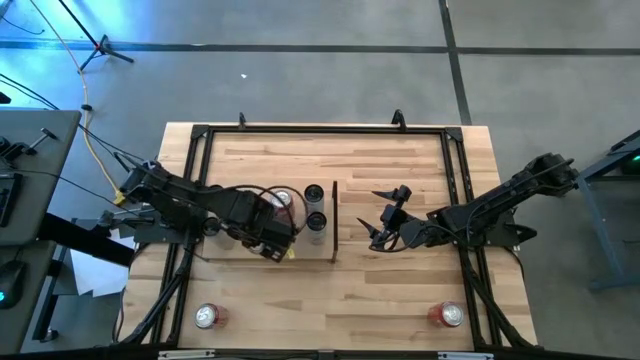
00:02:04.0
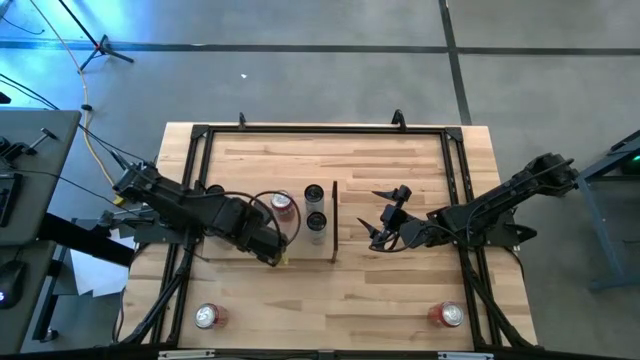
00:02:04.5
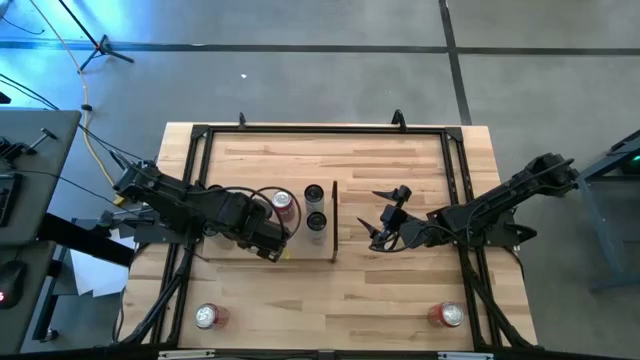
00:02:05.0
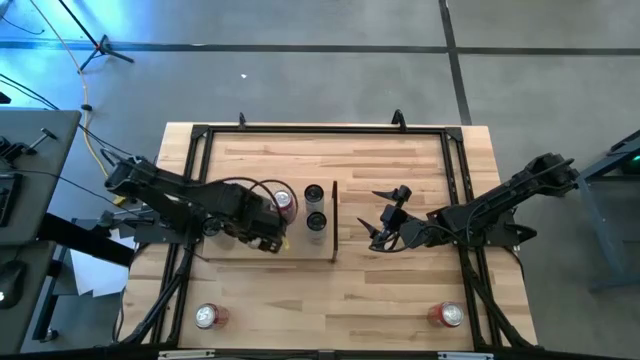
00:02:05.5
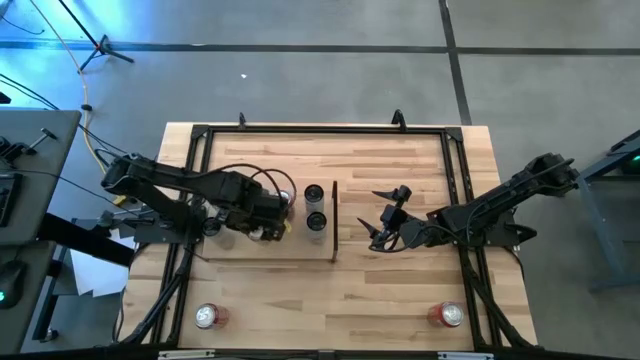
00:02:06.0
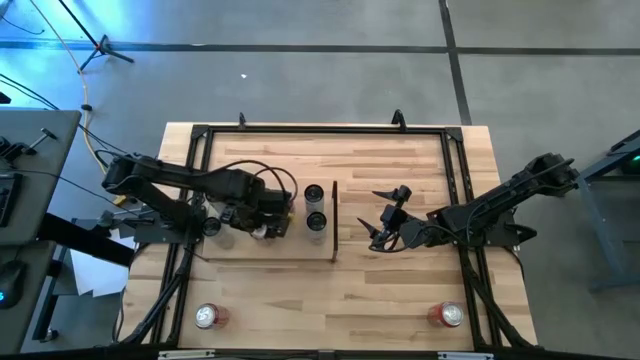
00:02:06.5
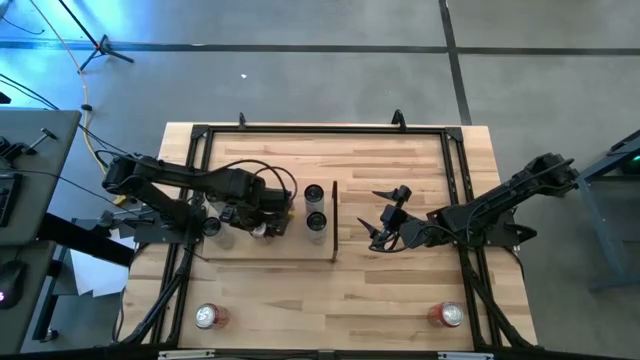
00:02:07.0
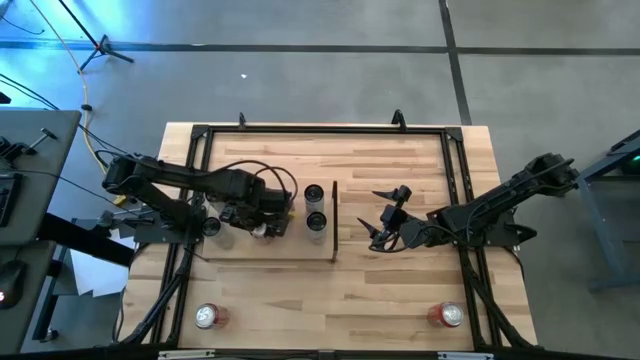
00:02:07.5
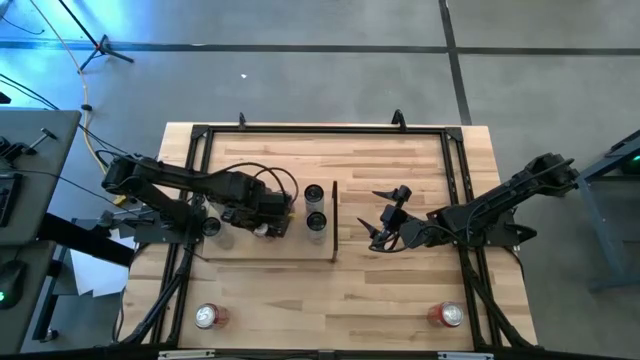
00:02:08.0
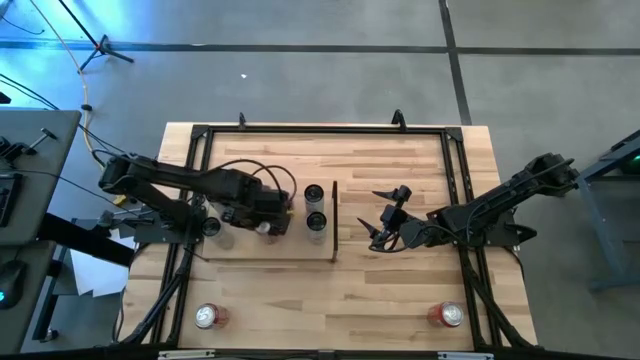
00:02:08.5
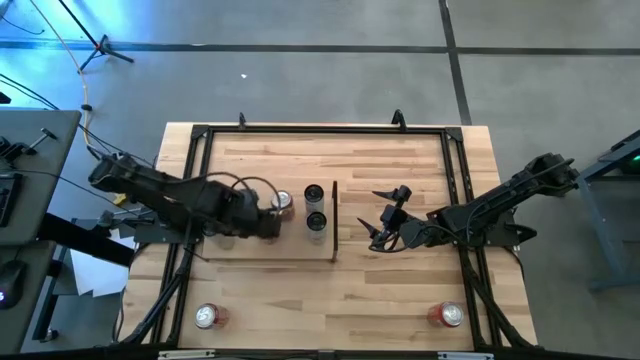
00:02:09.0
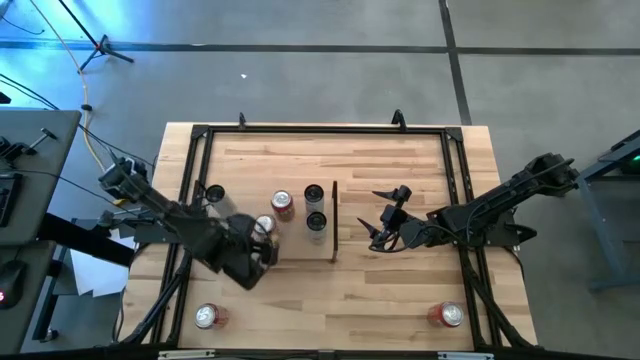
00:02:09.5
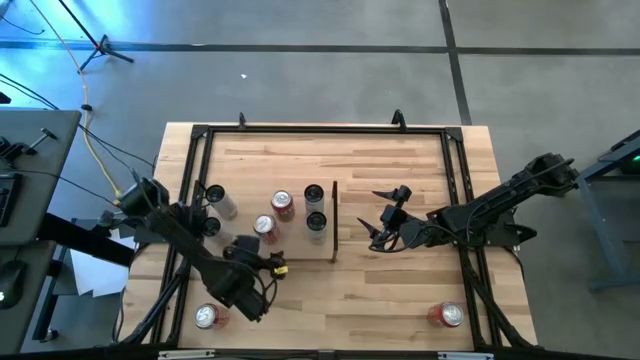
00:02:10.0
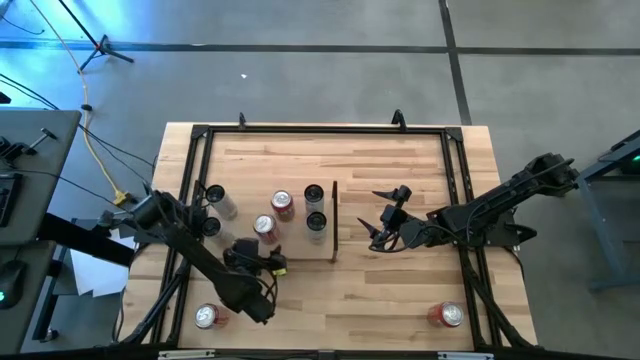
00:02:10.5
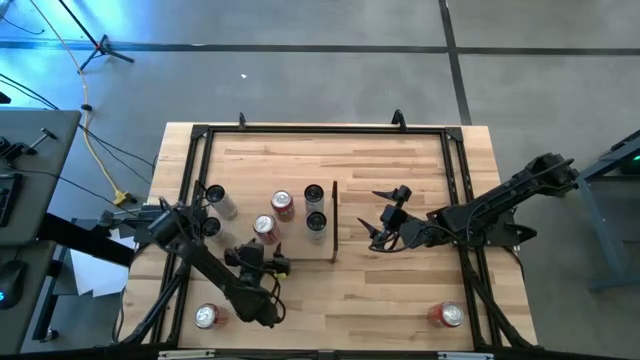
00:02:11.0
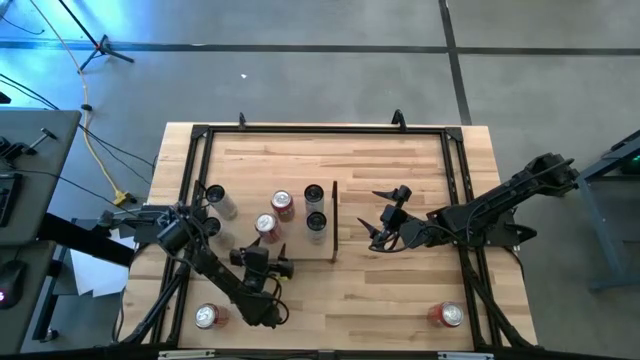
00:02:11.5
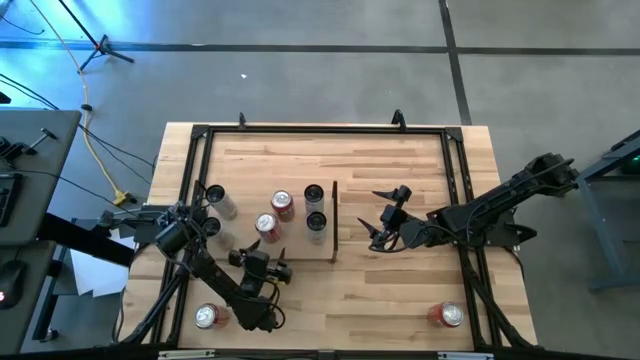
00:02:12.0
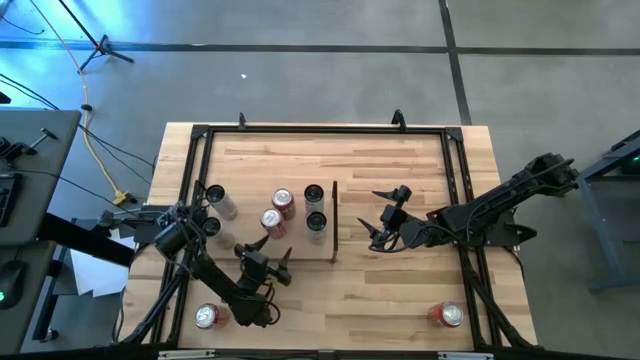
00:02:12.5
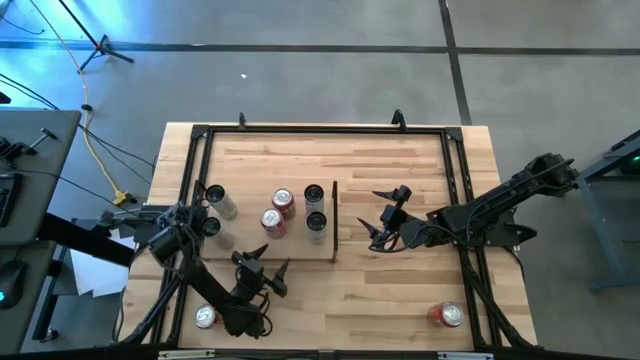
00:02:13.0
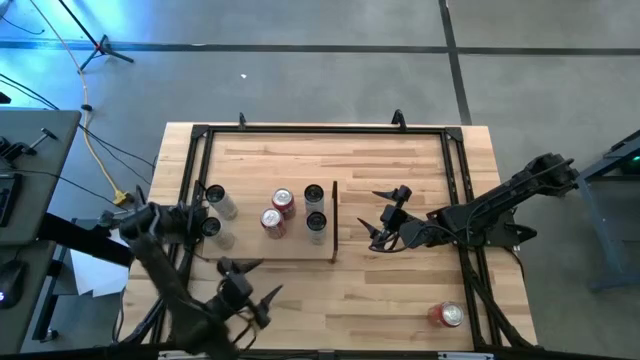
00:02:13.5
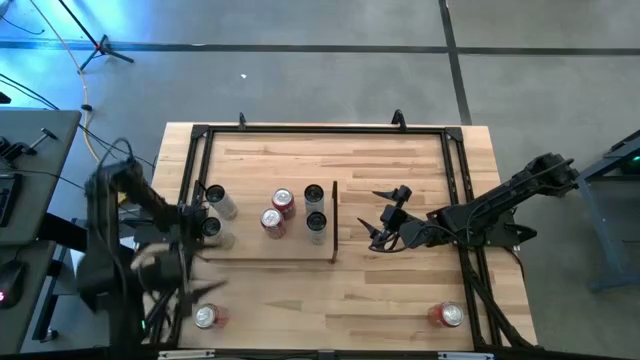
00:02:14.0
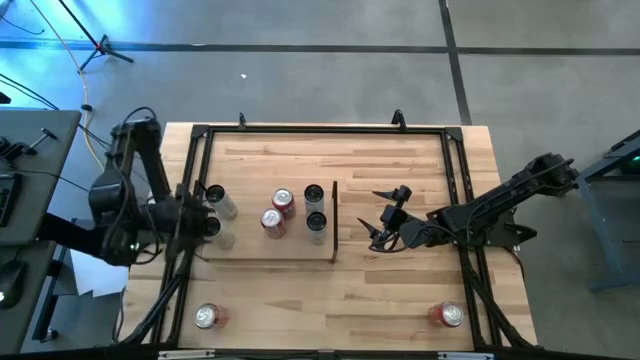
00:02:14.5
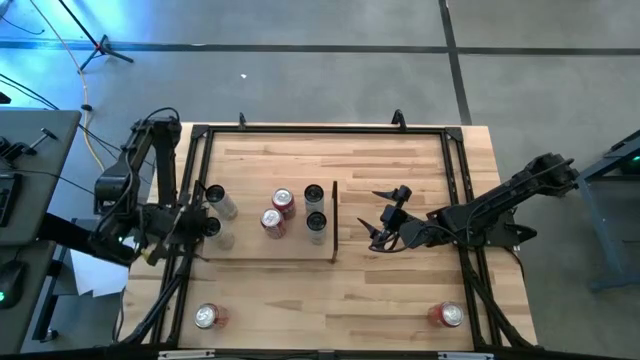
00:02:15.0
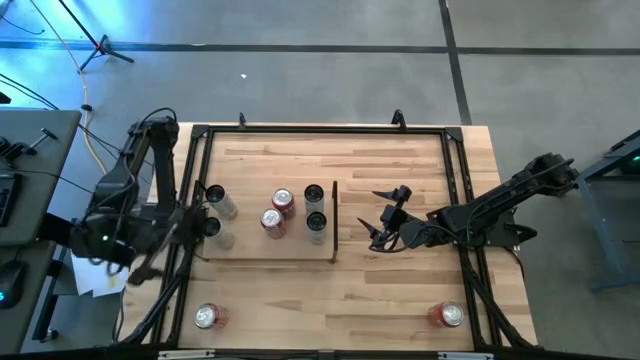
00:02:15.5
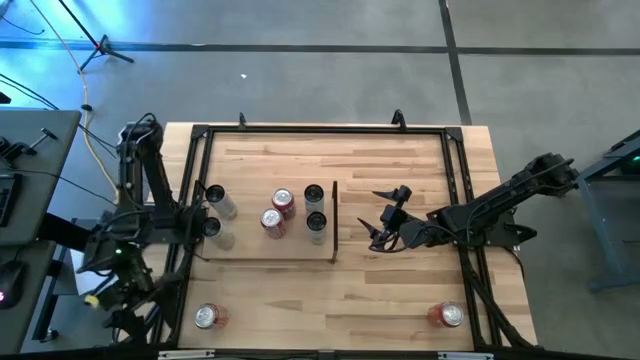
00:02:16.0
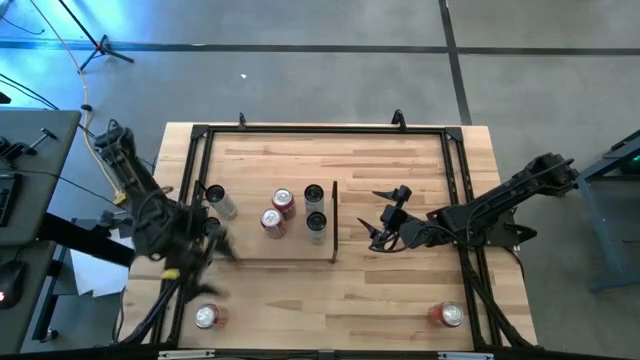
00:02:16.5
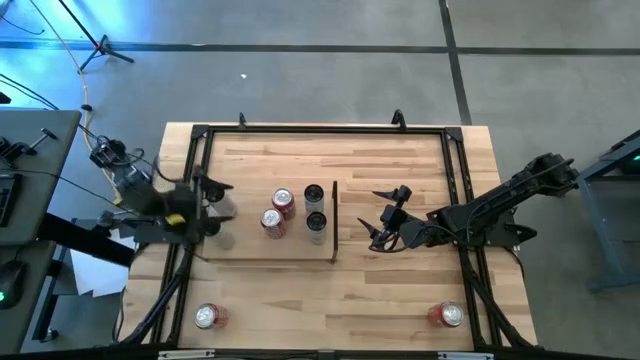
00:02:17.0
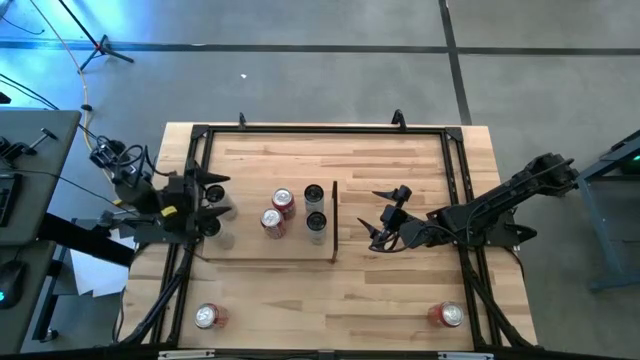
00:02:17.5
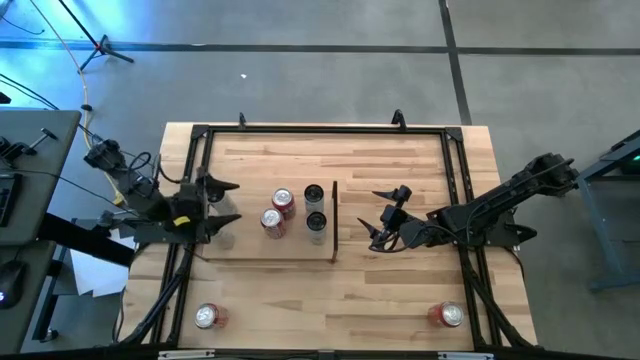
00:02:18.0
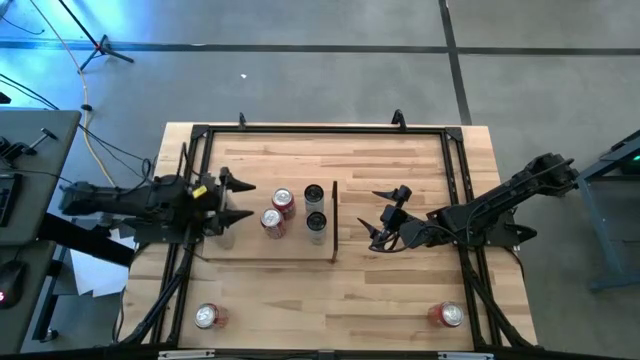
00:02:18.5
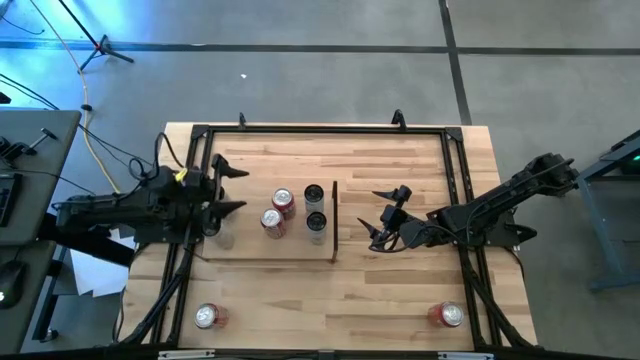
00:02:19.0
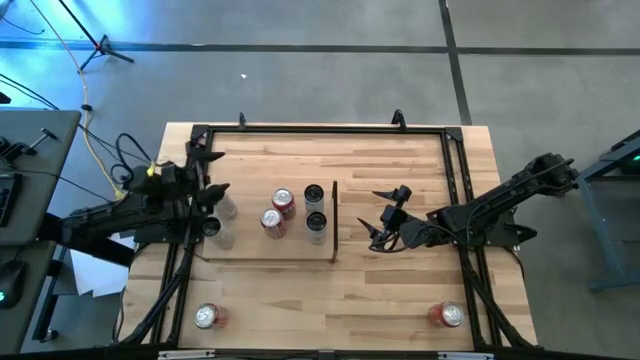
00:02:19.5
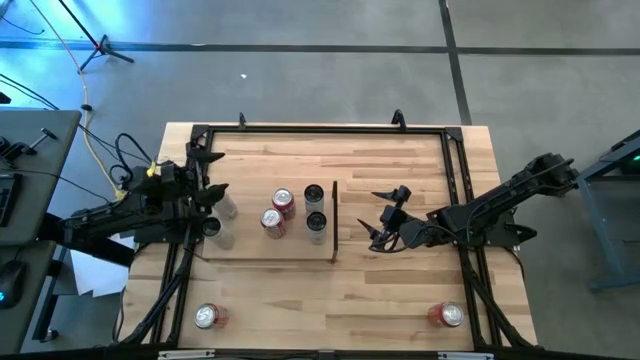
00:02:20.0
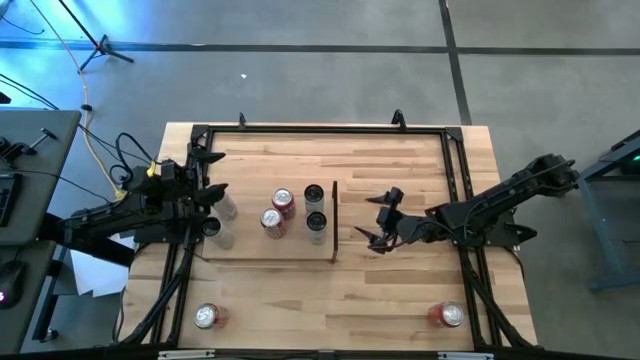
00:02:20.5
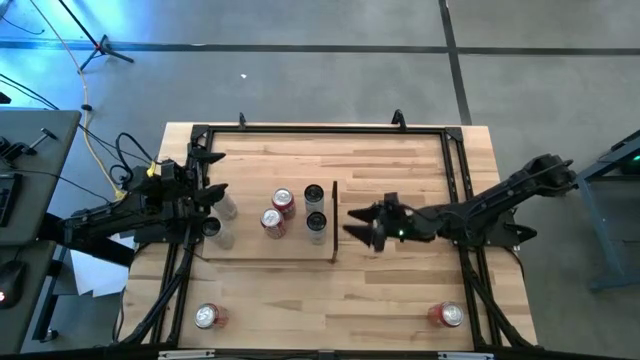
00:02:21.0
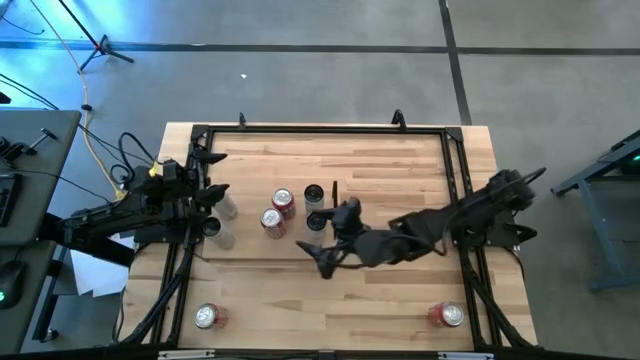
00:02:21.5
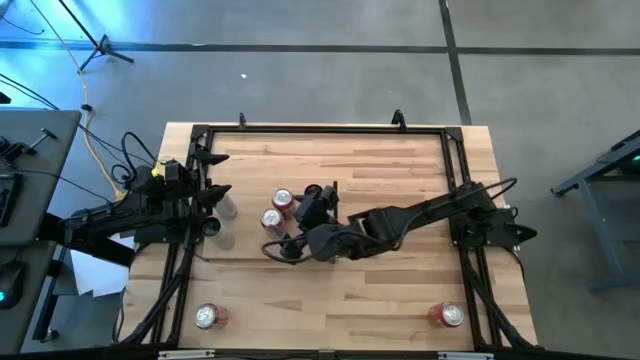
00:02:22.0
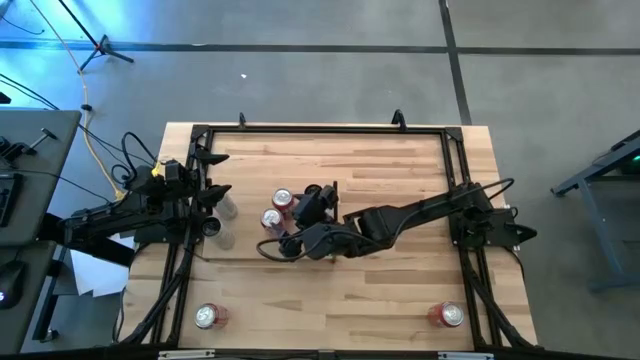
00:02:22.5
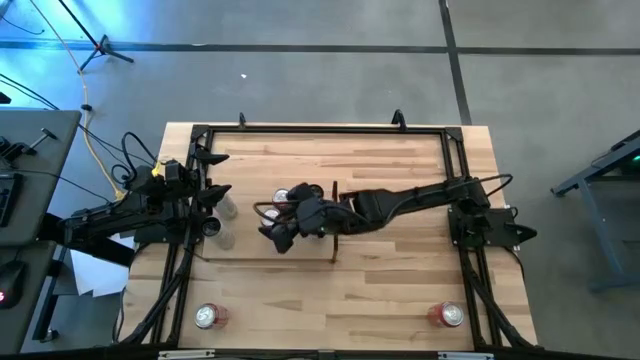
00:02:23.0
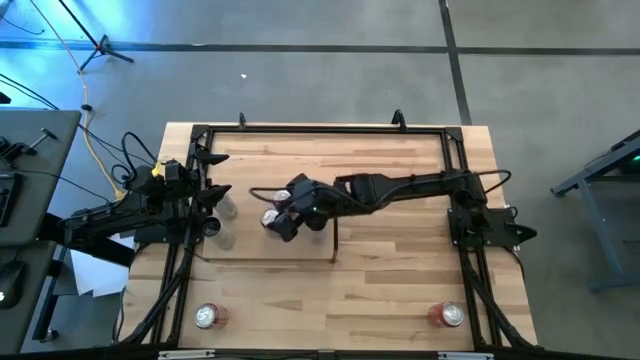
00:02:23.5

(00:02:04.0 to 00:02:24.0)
Task: Place canned beverage on shelf
Put the right red white soda can on the shelf

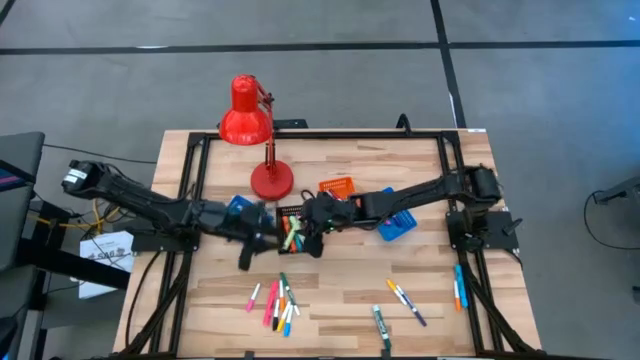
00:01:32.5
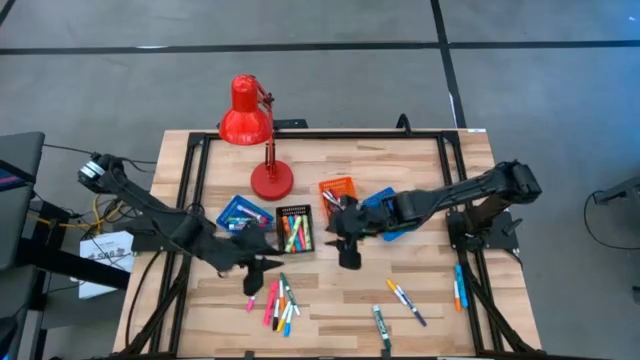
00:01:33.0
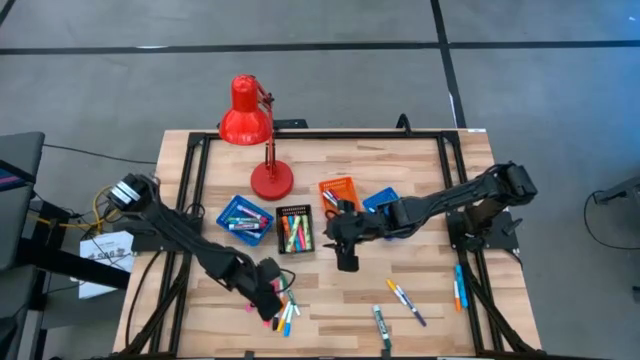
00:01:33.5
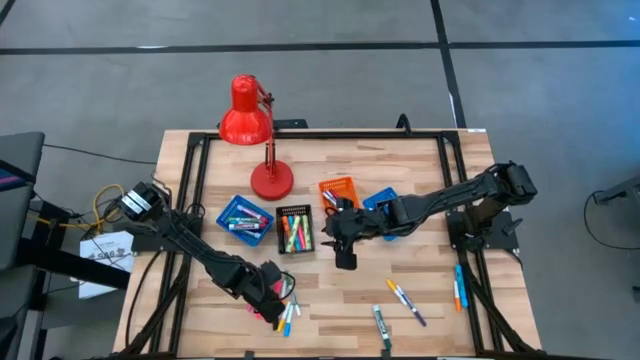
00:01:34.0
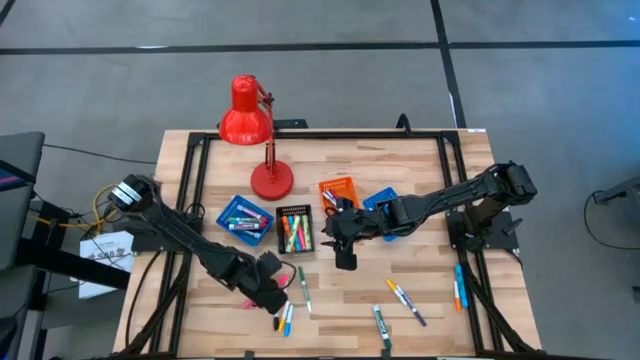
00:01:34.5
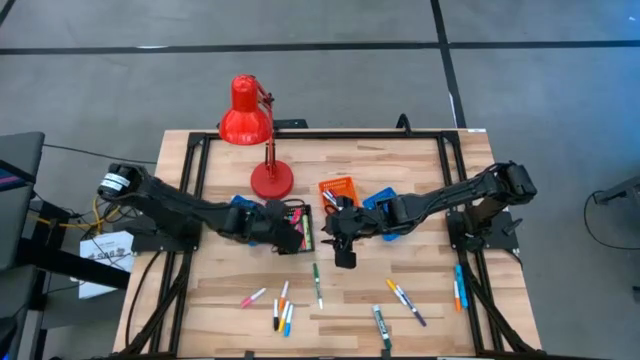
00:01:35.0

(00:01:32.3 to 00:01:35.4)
Task: Pick & Place Markers
Put the large pink highlighter pen into the black basket
